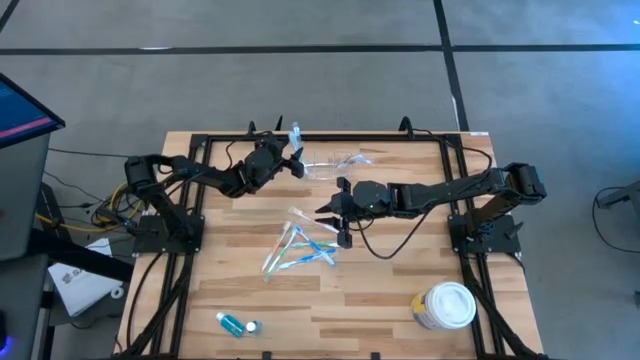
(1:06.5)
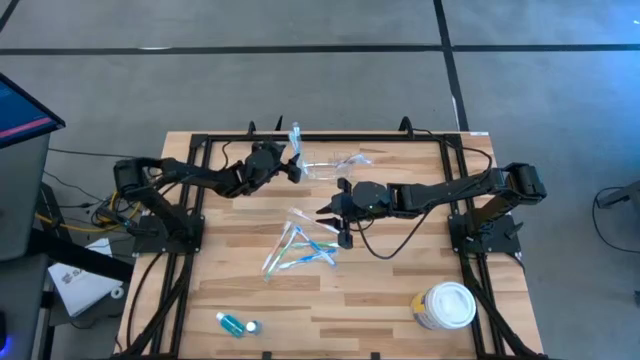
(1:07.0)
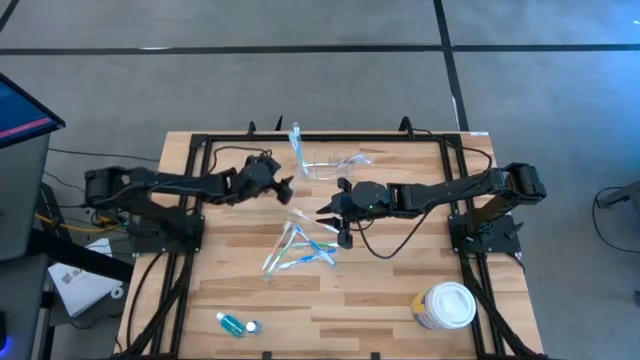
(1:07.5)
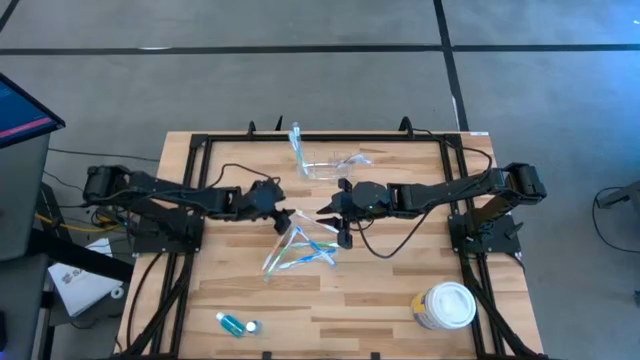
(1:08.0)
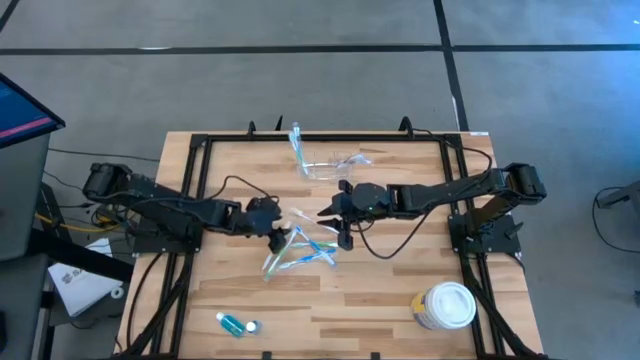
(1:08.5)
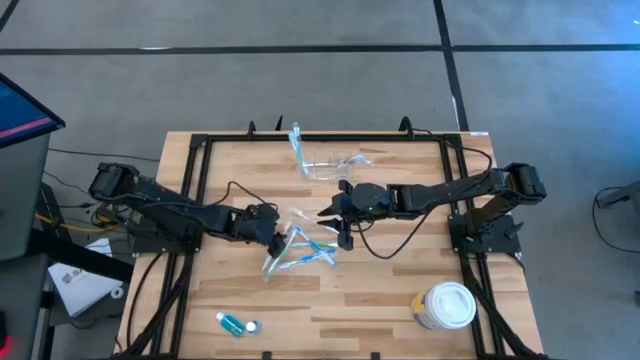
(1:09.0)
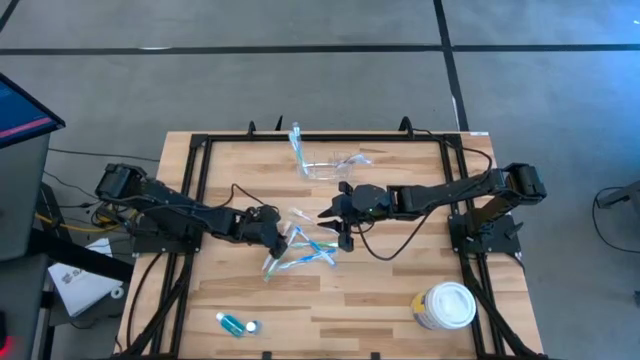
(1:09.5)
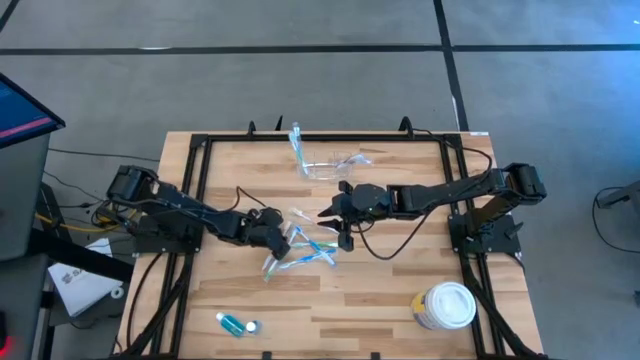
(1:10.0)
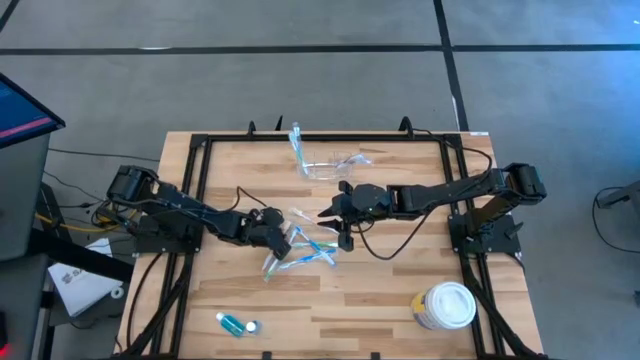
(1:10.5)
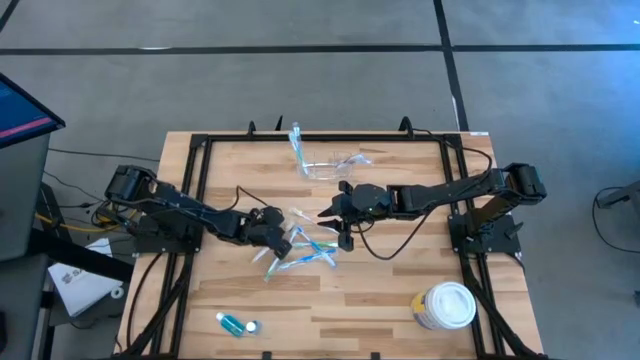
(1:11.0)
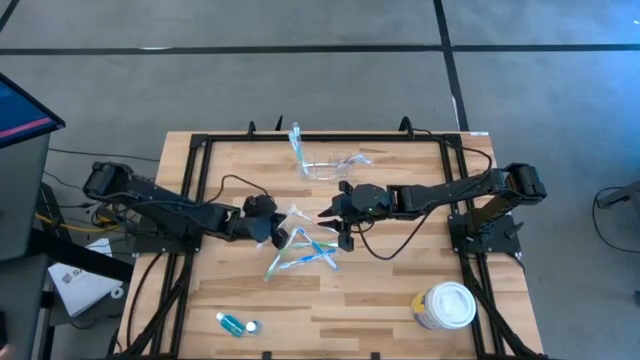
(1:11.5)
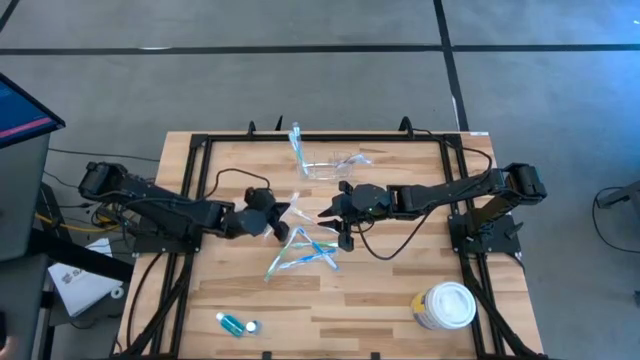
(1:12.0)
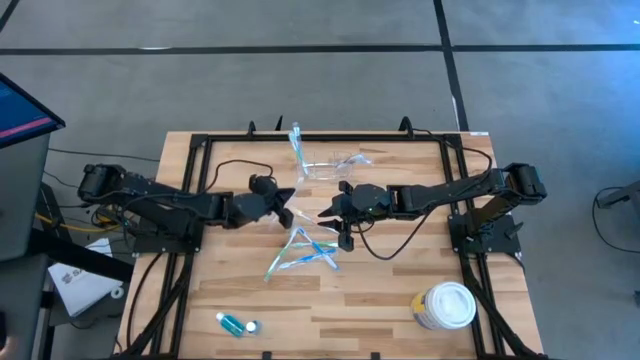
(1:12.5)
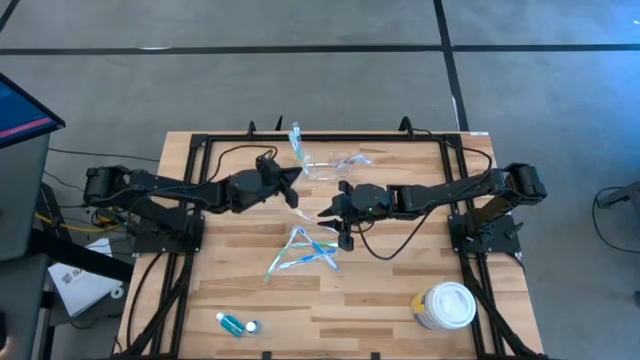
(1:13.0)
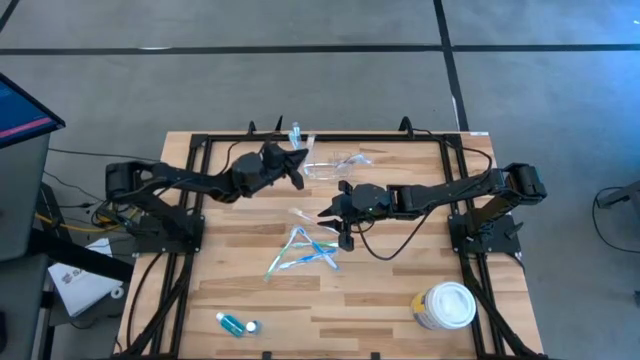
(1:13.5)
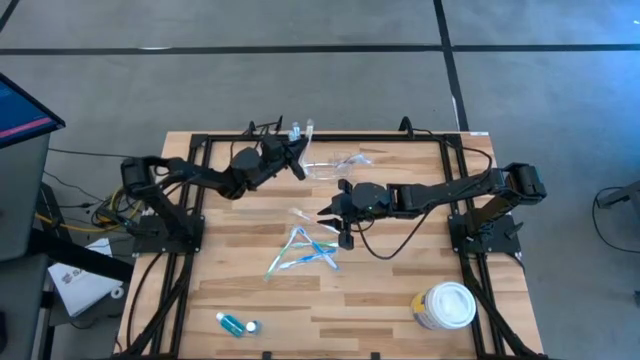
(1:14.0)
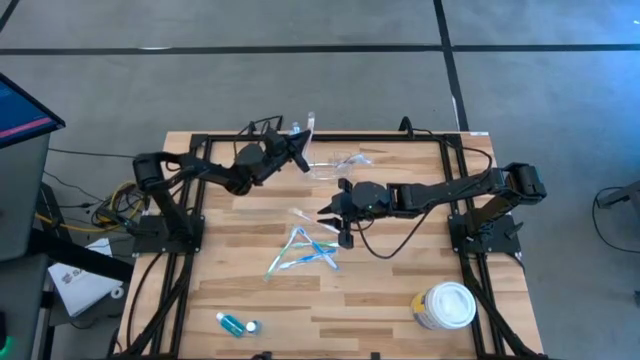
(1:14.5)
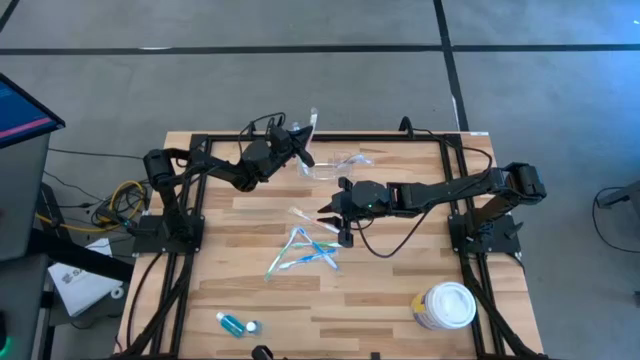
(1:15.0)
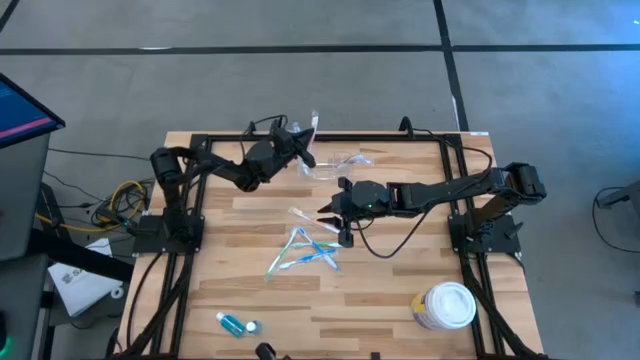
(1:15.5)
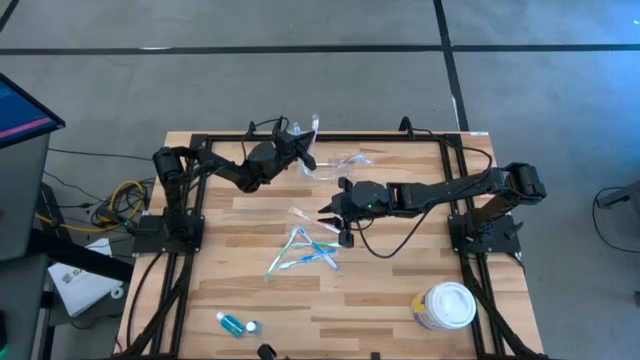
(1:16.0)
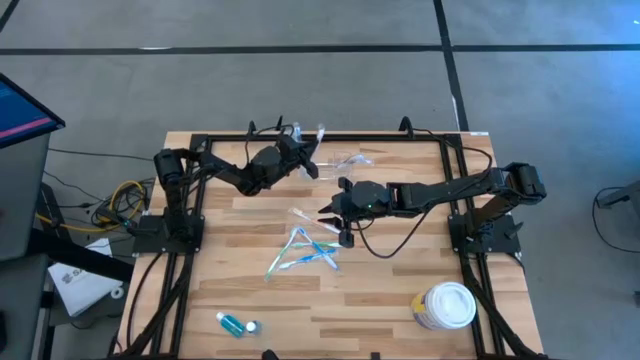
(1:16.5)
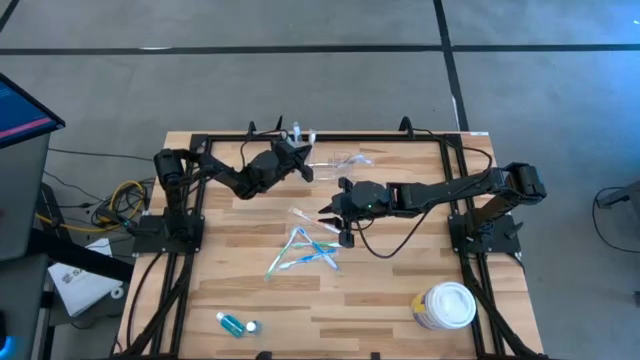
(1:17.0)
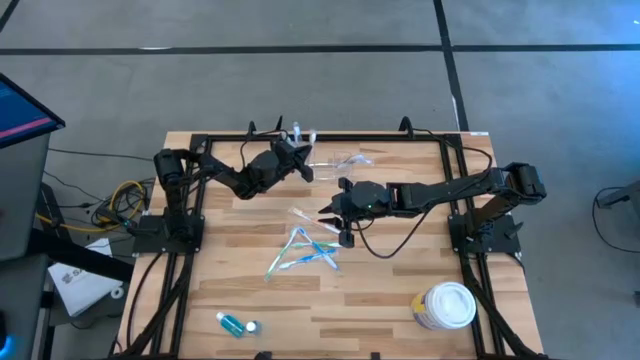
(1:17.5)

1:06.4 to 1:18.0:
Task: Pick & Place toothbrushing station
Put the orange toothbrush into the transparent organizer

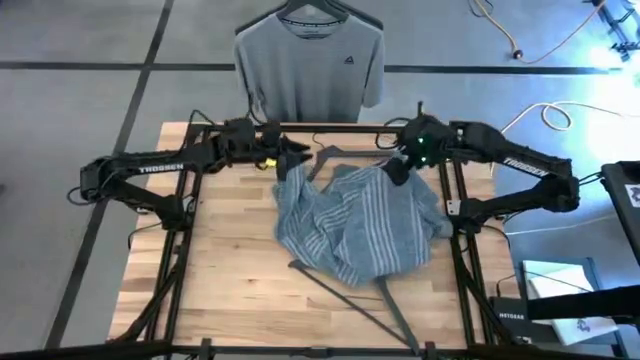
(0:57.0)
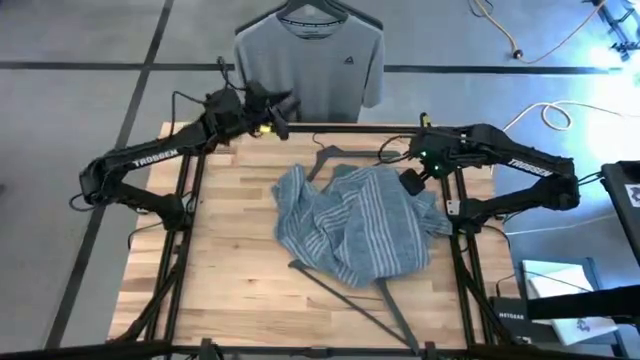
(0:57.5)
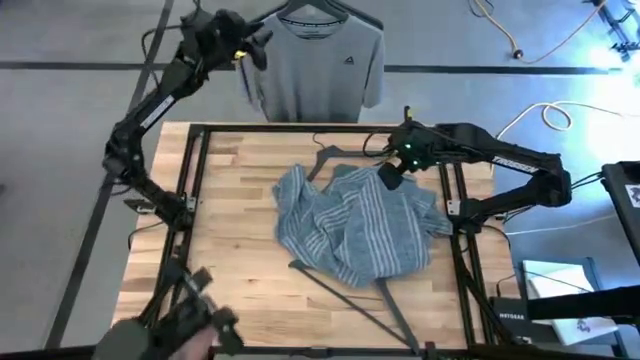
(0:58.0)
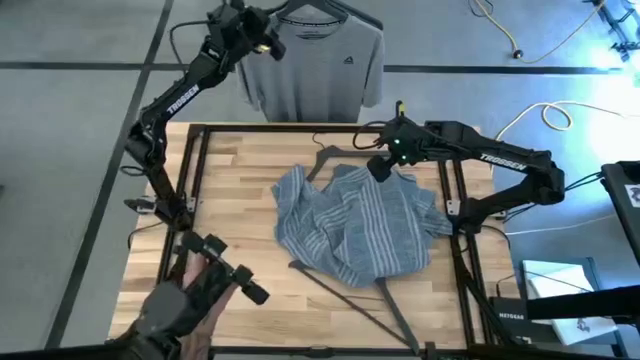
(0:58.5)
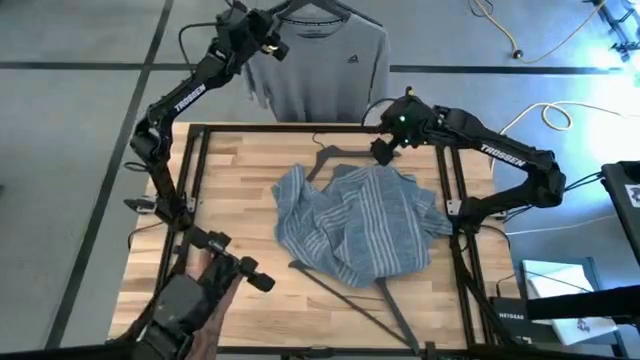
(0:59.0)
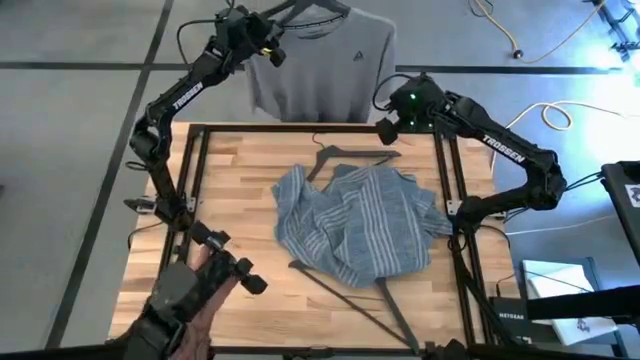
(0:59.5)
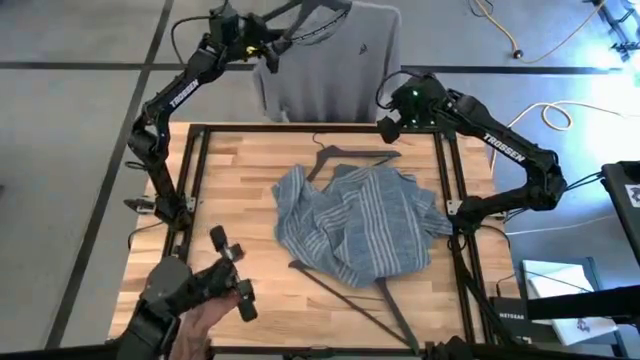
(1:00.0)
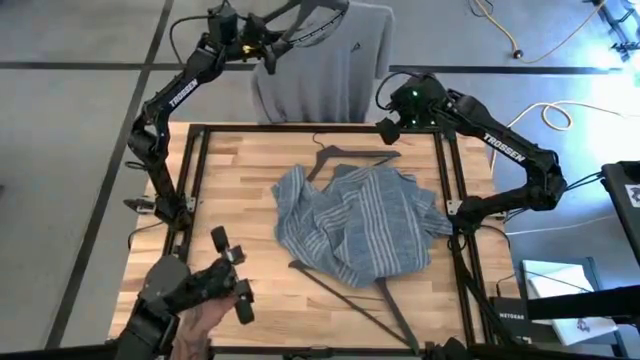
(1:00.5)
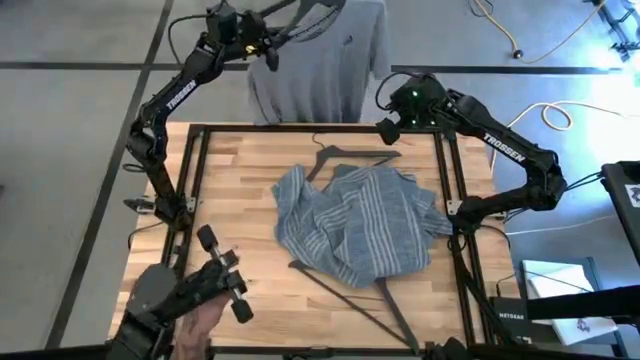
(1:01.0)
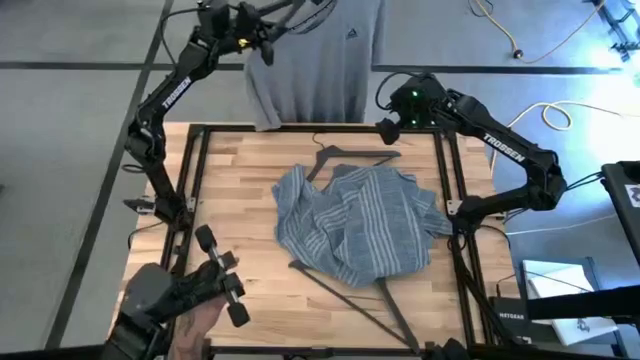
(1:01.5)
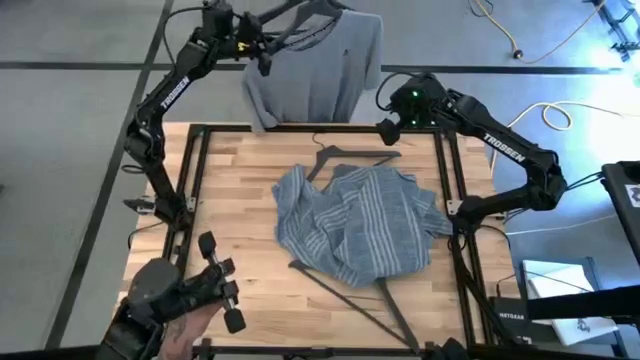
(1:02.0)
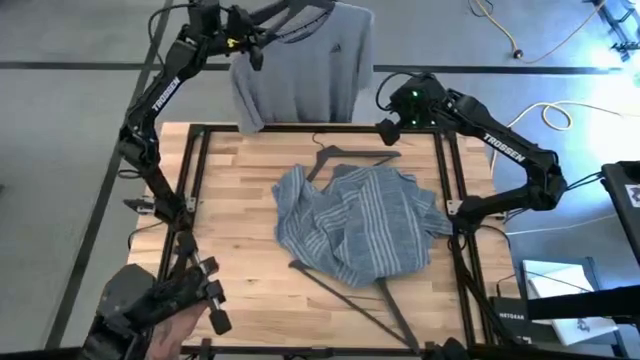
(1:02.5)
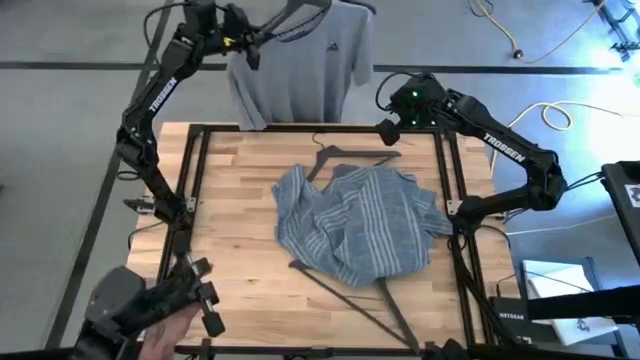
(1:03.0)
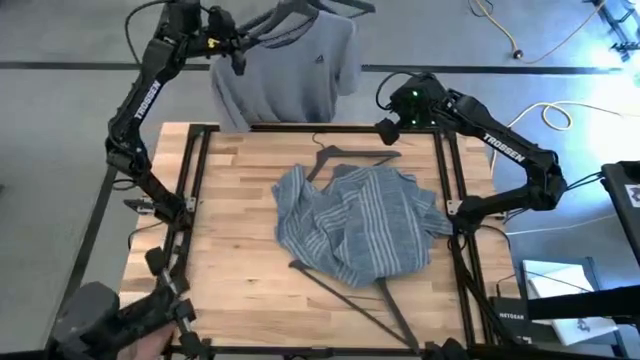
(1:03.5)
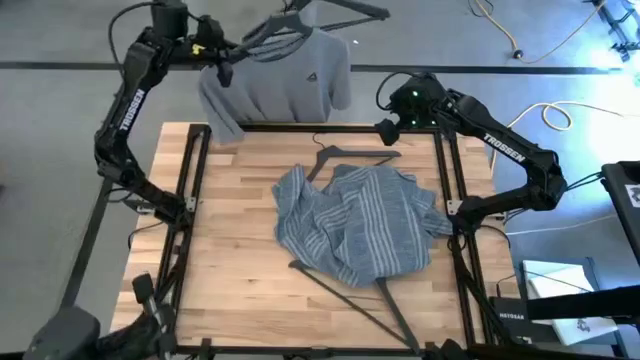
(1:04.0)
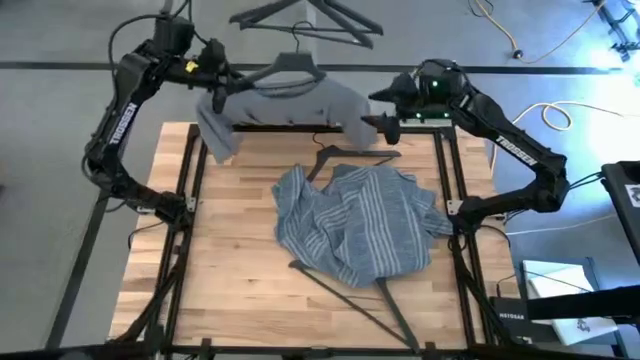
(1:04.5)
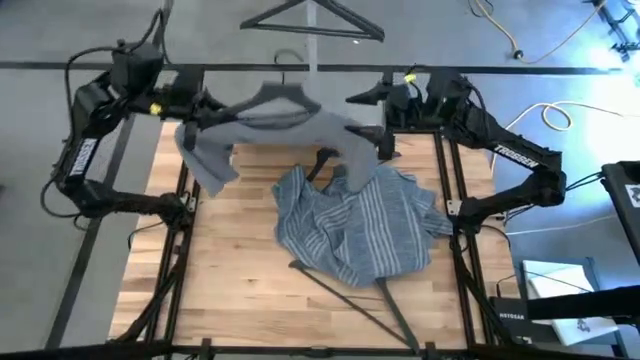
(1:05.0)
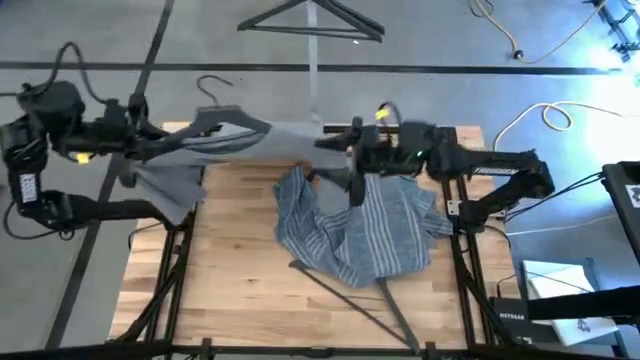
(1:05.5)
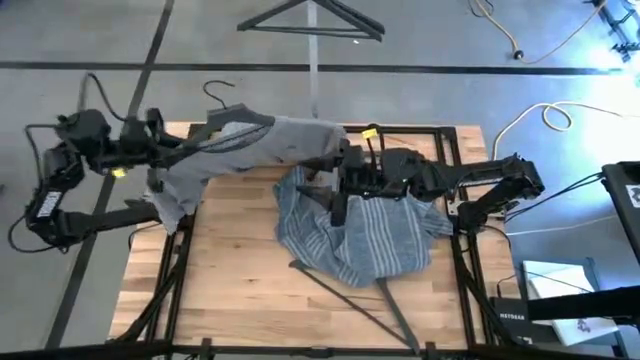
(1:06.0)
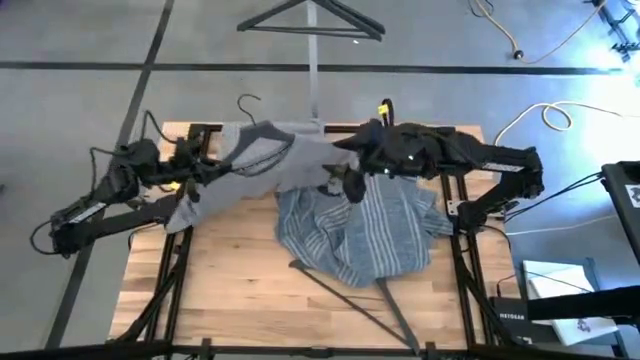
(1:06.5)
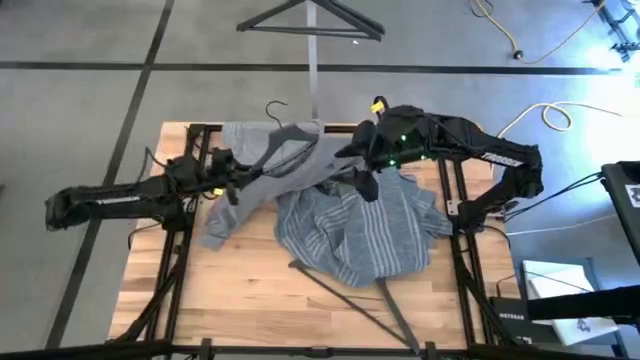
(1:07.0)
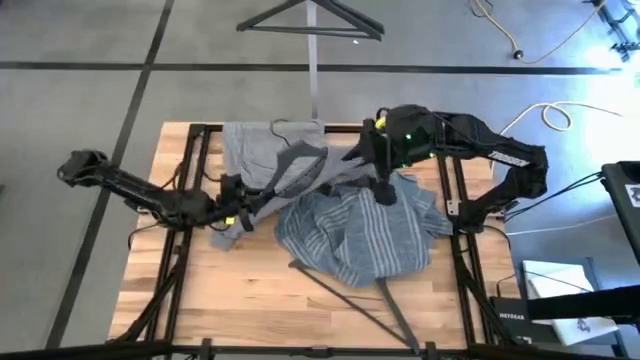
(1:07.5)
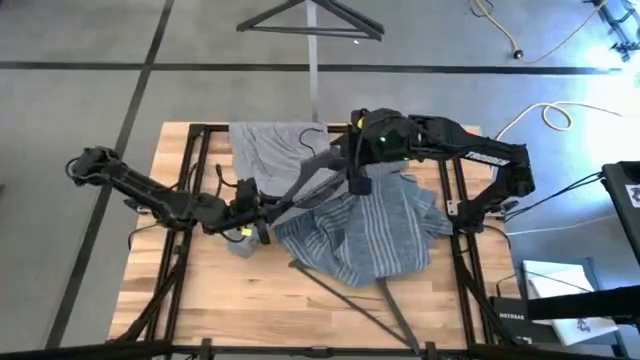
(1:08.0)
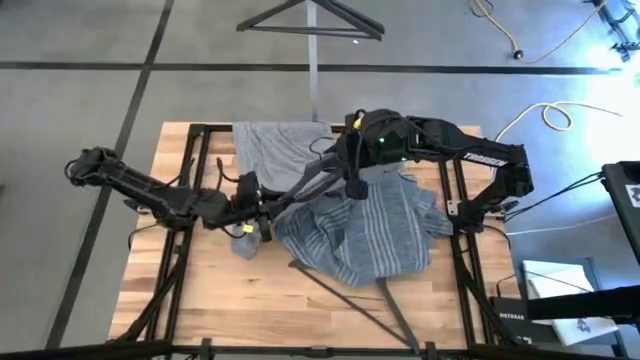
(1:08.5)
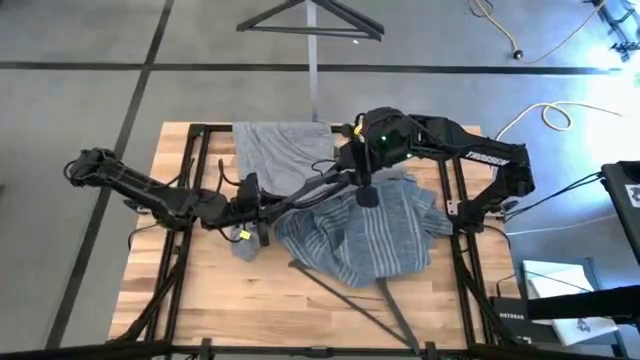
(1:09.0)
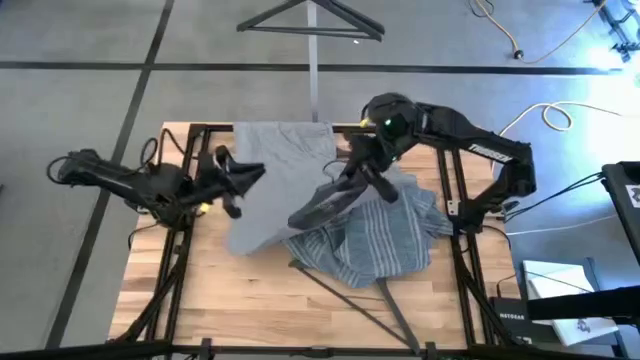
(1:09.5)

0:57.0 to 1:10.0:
Task: Unhang clothes
Unhang the shirt
